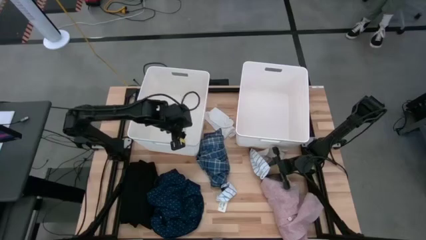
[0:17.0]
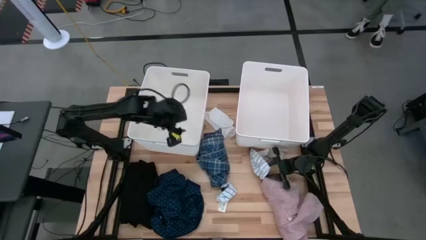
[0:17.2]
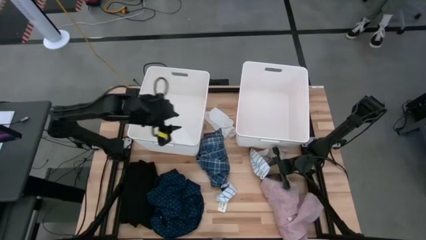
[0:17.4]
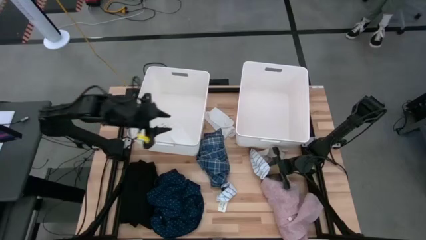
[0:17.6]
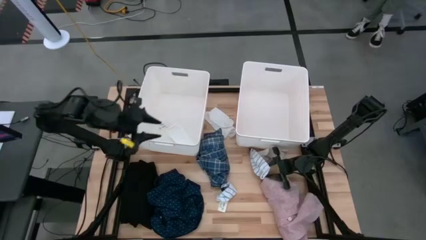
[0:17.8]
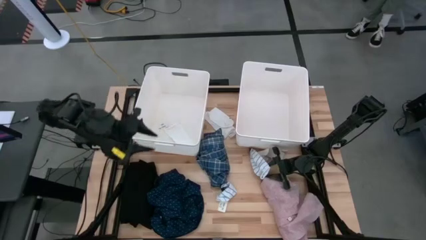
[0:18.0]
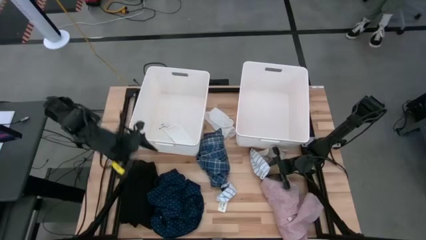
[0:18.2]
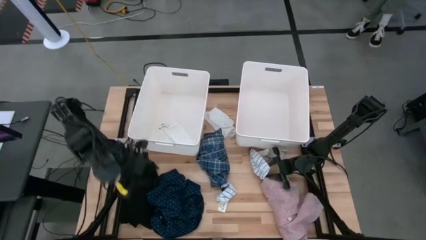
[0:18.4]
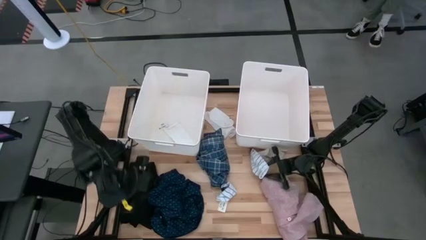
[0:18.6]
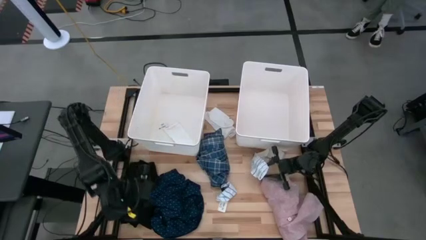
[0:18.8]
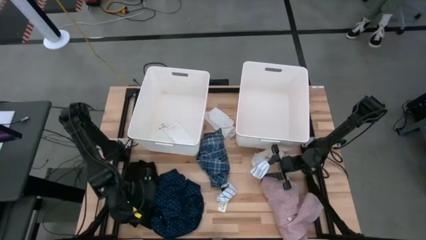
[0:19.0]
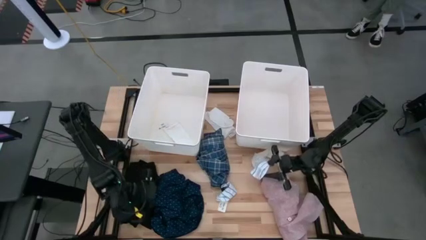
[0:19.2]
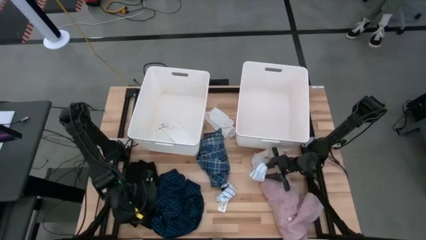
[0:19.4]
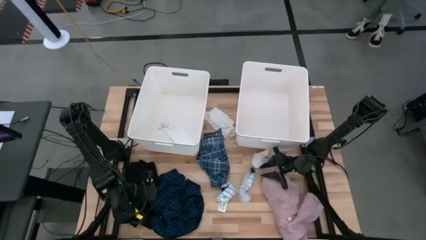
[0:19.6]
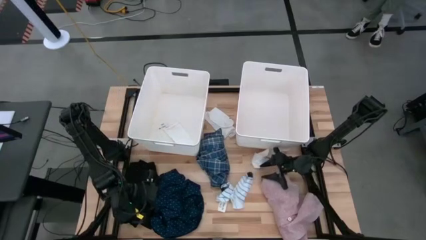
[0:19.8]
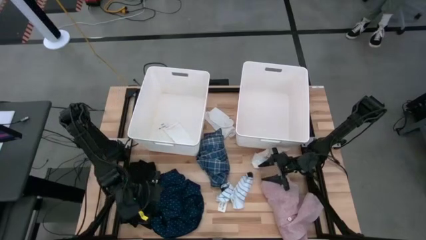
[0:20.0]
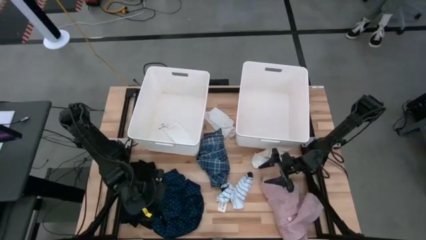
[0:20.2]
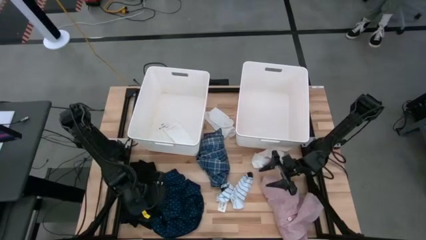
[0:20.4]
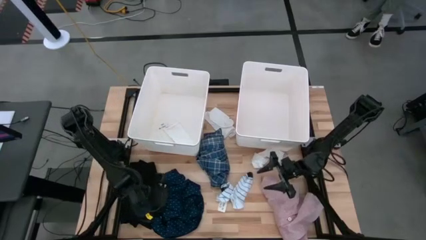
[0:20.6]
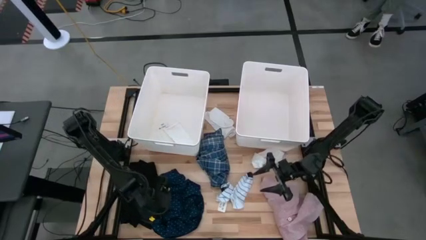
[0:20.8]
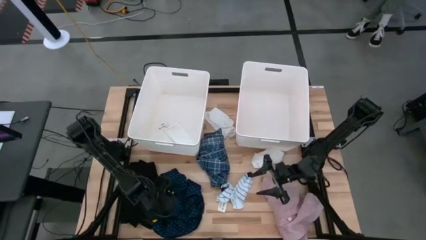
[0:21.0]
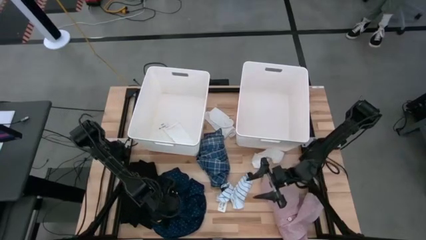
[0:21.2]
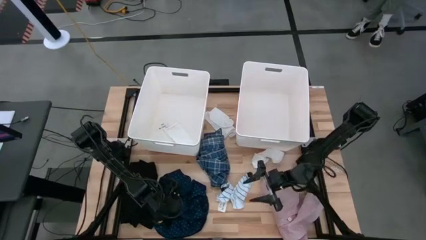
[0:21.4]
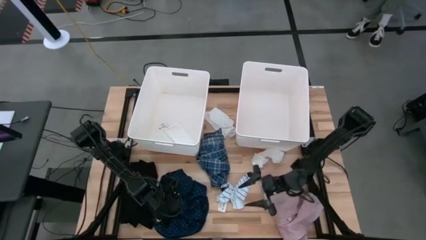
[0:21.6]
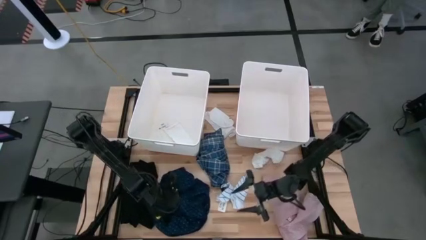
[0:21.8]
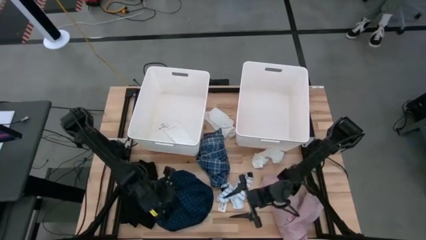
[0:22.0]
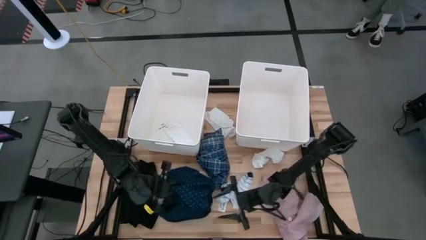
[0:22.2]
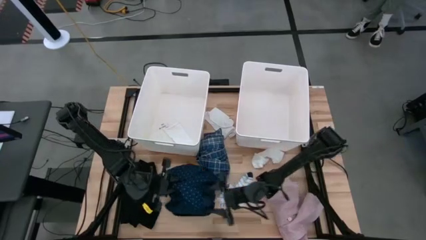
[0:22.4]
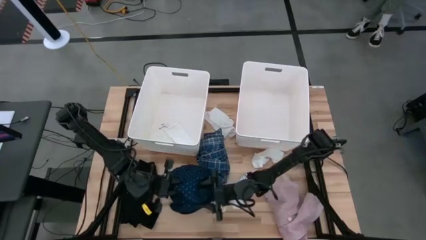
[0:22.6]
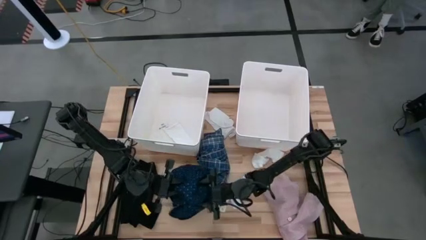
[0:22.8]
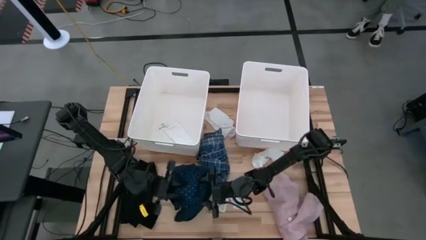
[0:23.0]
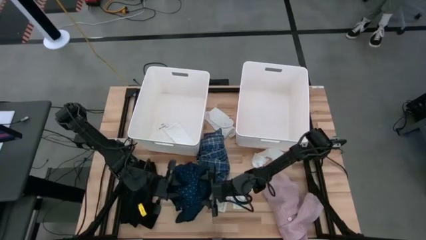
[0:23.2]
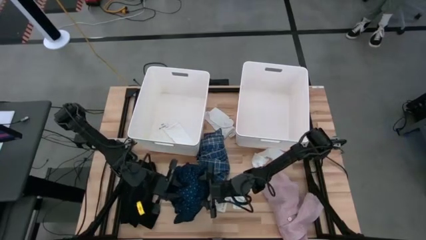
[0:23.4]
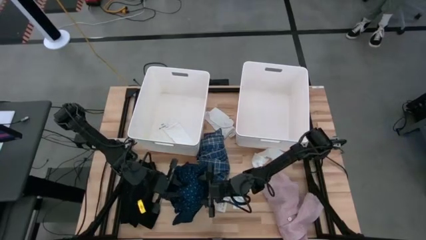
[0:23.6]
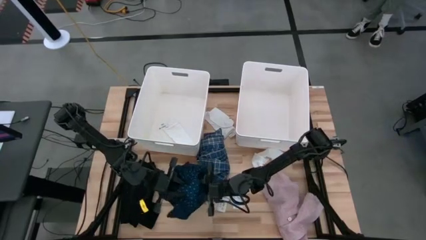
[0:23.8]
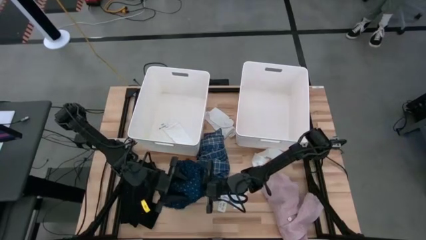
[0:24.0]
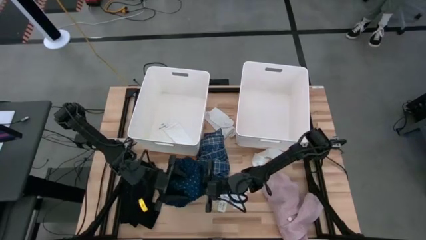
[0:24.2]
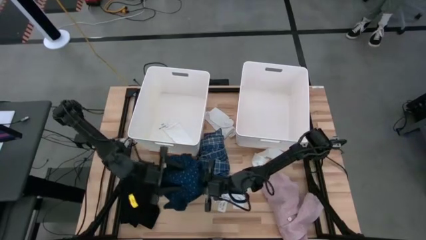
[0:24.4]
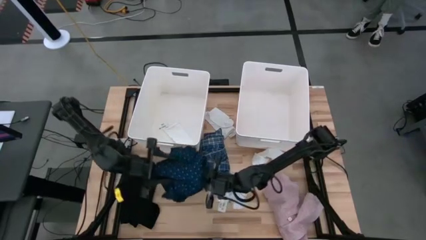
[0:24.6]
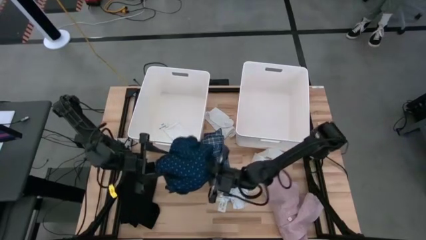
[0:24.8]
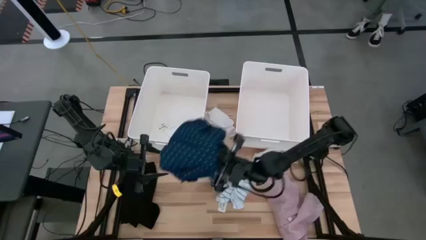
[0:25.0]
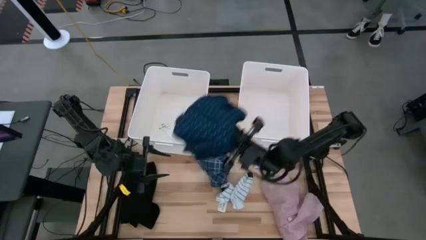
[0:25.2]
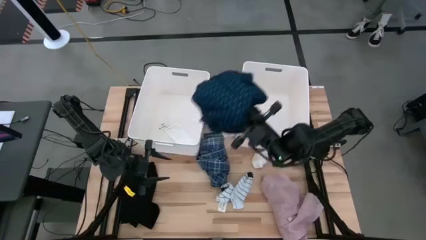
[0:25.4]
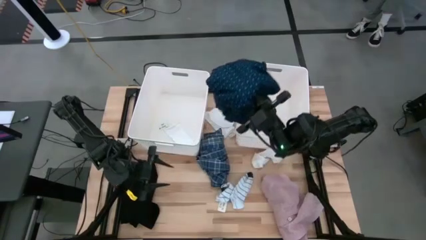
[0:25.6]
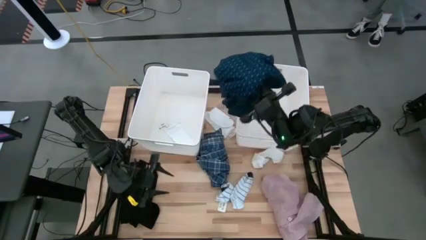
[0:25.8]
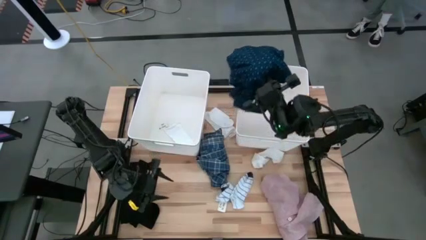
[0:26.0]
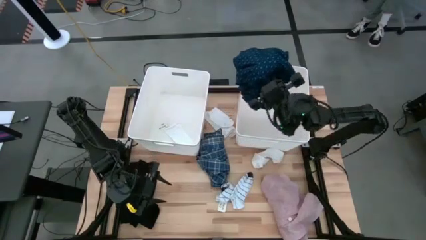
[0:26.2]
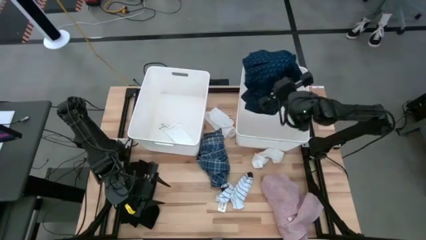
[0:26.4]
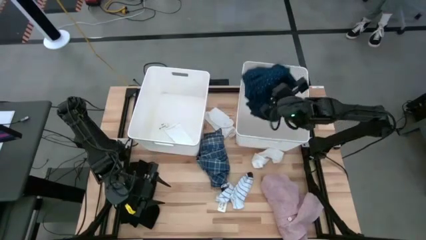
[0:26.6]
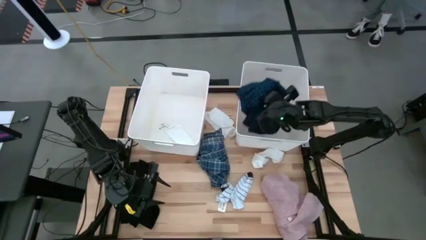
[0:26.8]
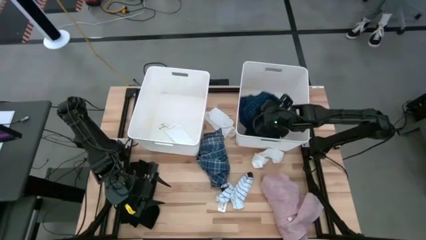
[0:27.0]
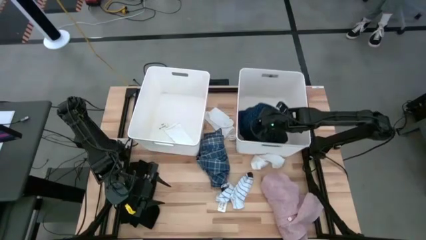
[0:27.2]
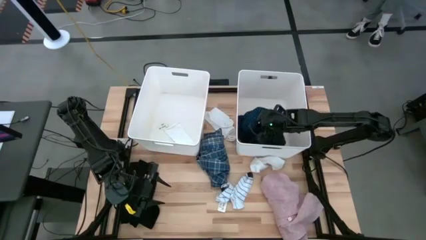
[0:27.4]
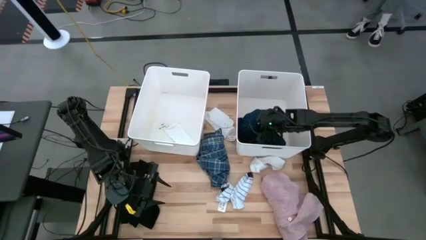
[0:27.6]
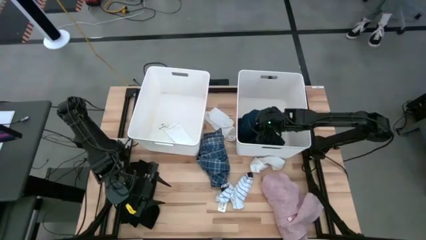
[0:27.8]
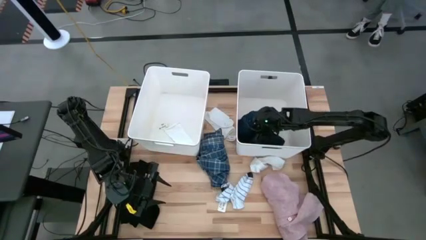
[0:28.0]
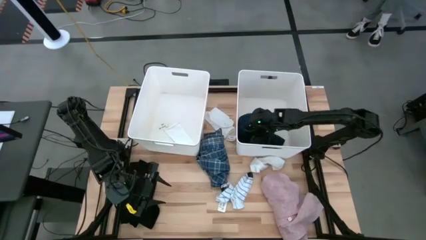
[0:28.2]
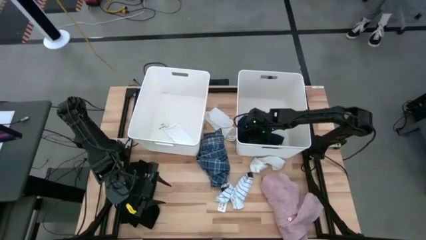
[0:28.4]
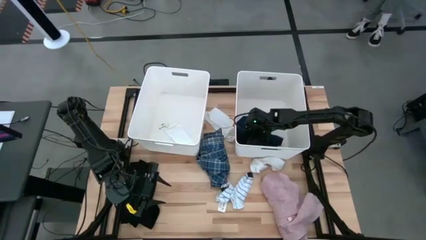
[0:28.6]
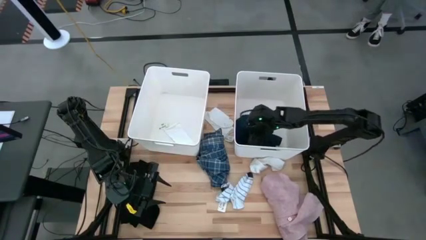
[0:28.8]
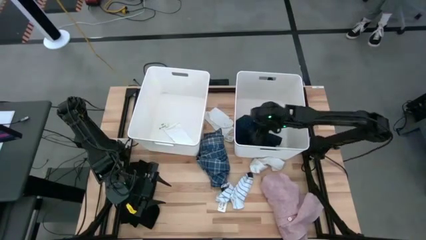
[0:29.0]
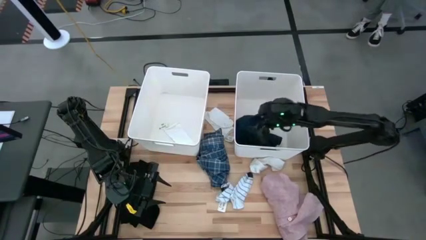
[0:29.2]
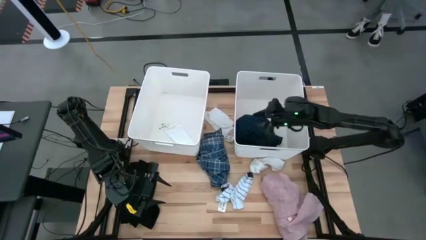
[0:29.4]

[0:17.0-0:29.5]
Task: Sort clothes
Put the dark blue shirt into the right white laundry bin
